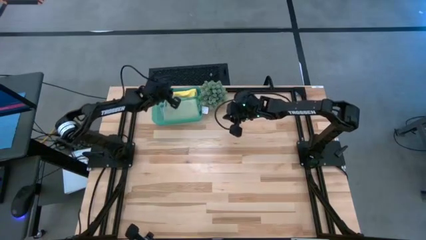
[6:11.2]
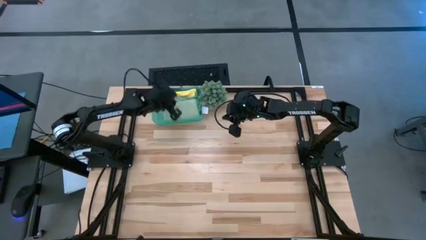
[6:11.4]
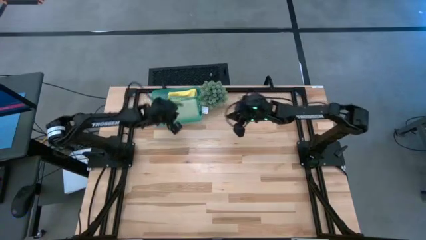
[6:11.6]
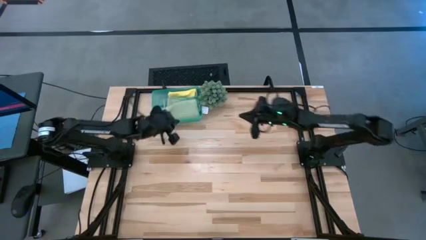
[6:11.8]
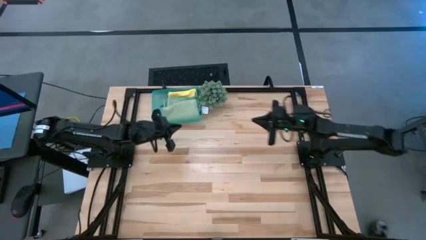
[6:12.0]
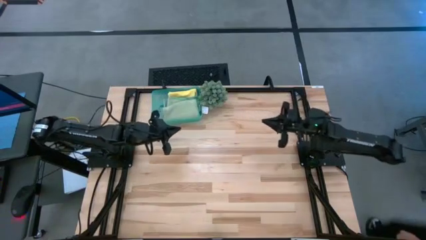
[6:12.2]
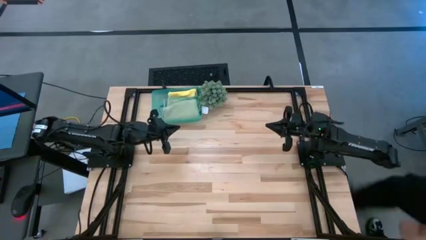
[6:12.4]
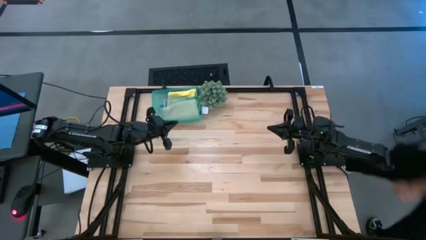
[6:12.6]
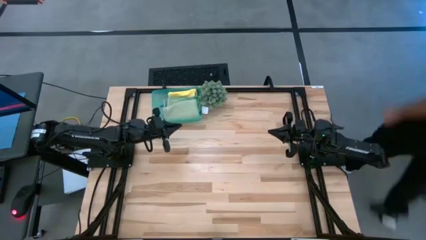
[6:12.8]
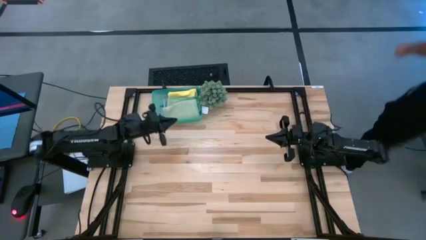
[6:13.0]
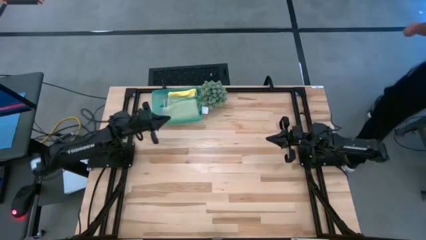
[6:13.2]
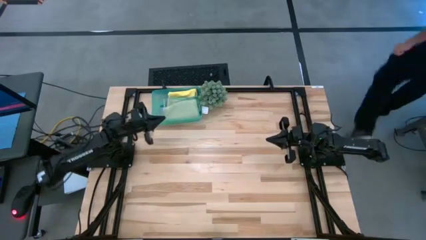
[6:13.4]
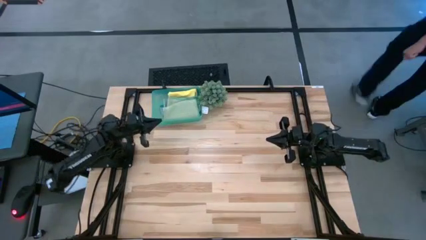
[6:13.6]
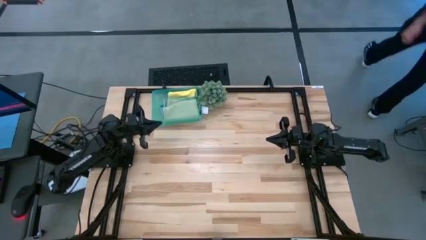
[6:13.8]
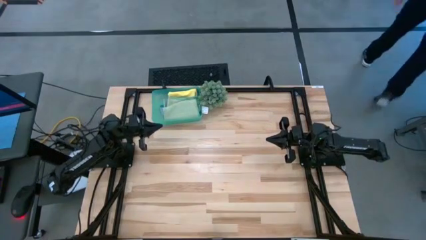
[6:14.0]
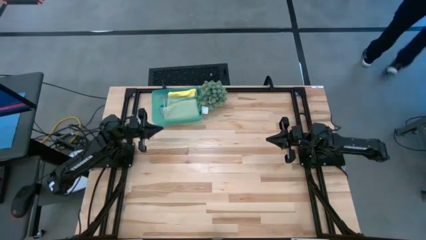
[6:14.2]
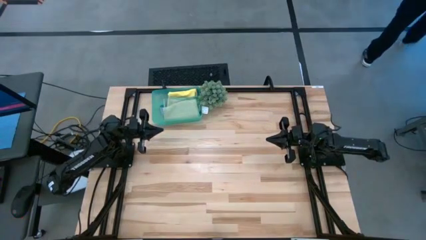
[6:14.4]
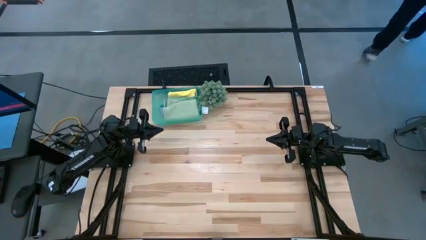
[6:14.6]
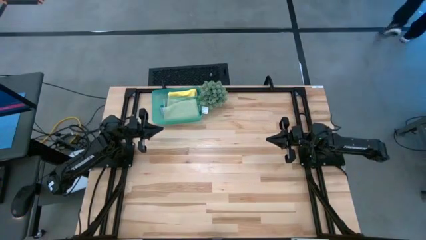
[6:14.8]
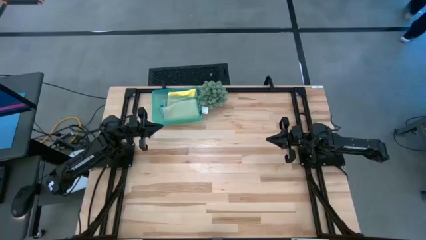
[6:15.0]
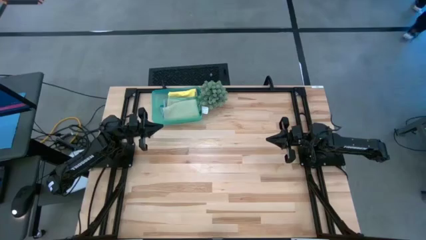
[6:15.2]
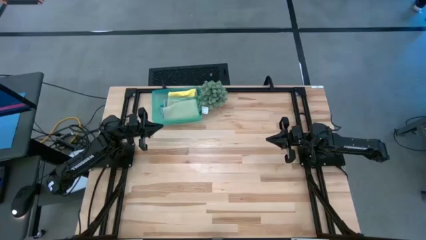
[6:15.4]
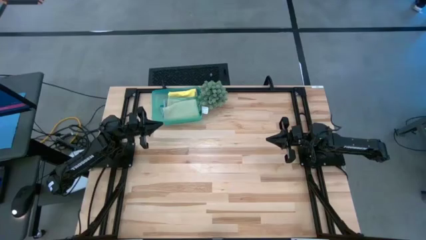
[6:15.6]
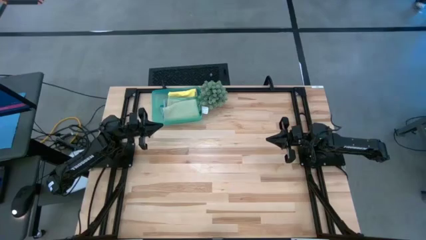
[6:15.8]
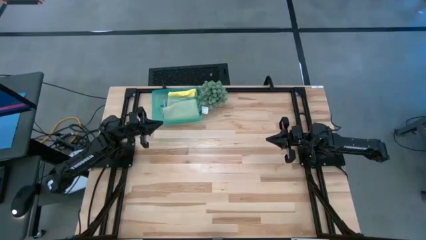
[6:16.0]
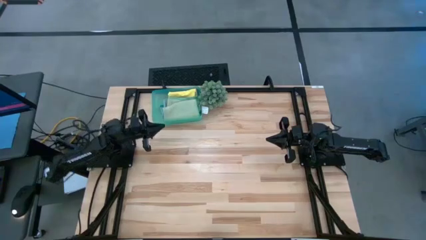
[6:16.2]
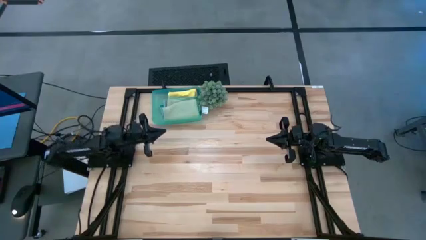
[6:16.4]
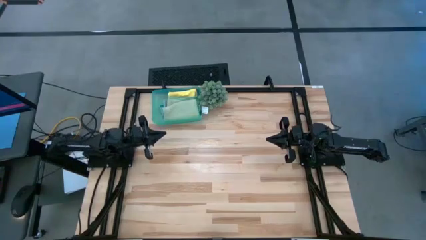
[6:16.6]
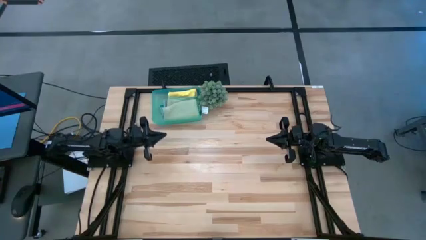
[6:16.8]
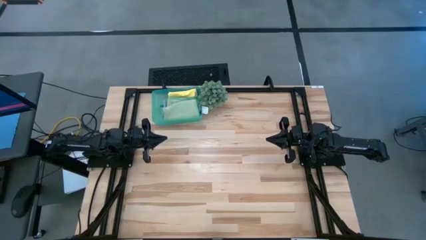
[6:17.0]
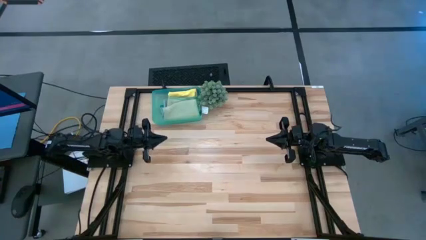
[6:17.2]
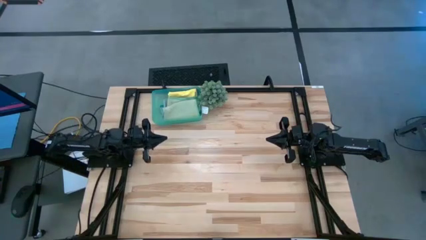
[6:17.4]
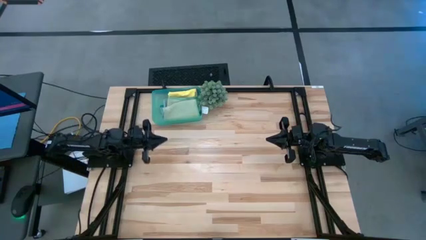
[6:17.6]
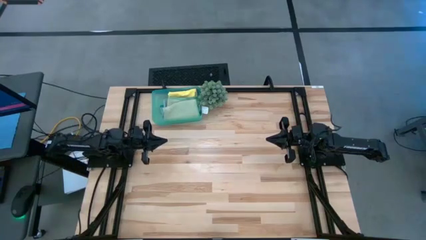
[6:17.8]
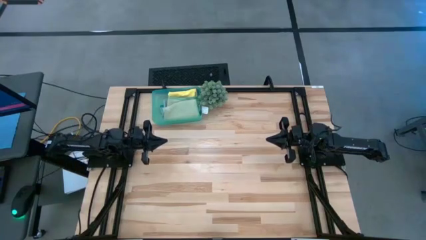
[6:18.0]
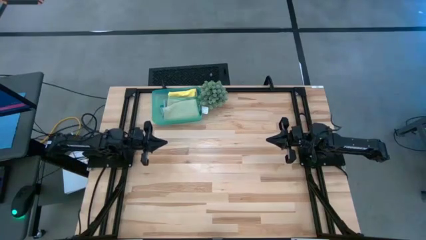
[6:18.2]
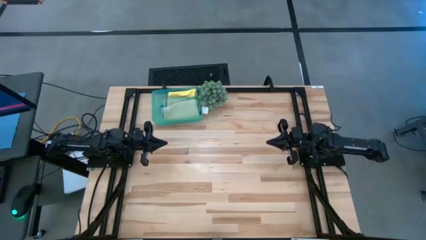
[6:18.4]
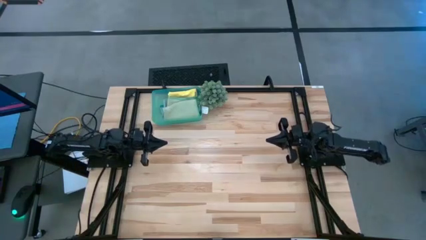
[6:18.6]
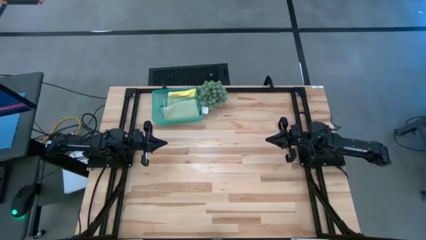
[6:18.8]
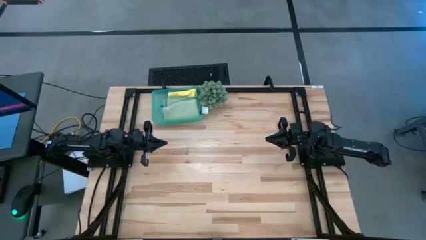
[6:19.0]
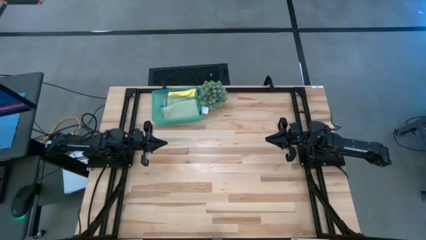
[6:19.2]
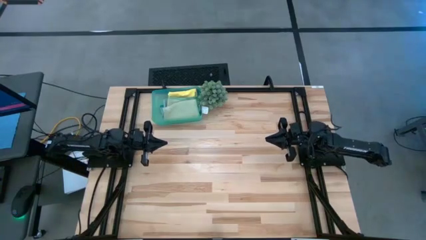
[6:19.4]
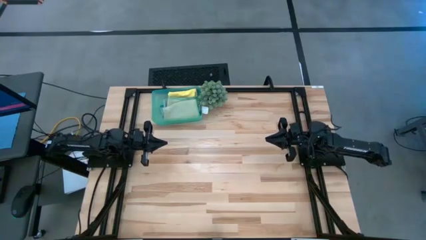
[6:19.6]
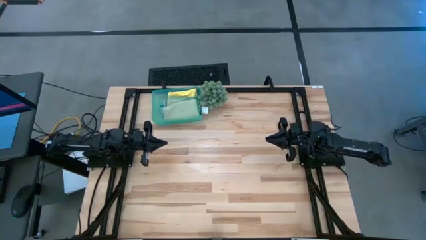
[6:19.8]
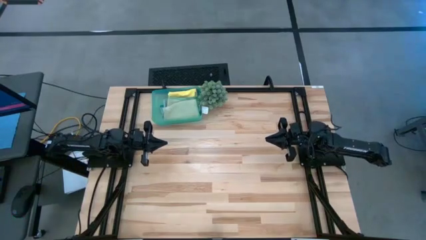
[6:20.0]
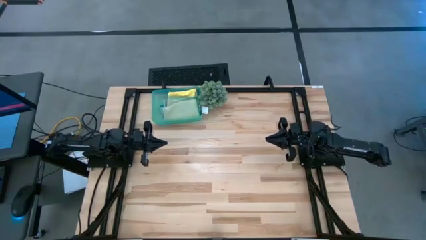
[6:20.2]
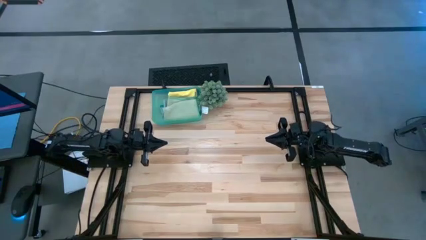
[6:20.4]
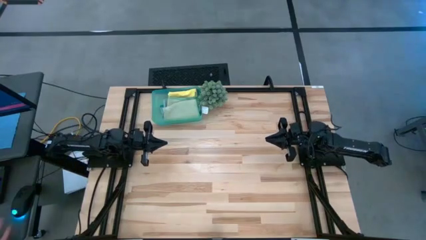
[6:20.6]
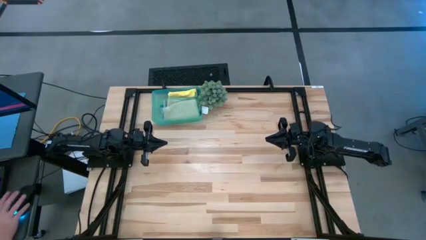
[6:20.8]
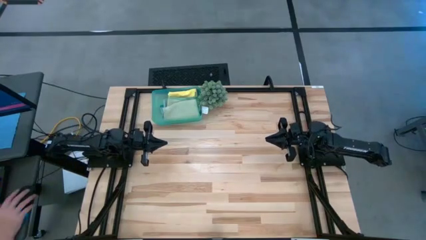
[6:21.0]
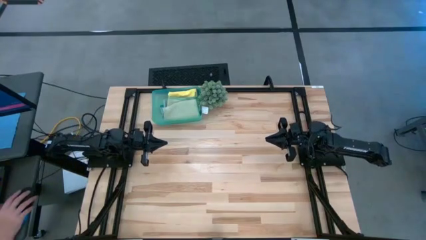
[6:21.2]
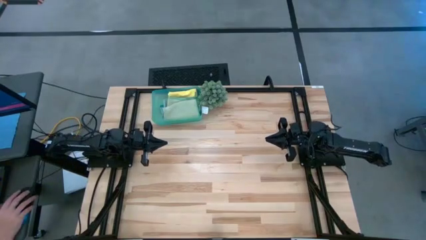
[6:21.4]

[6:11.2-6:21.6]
Task: Fold microfiber towels
Return to Home Position
